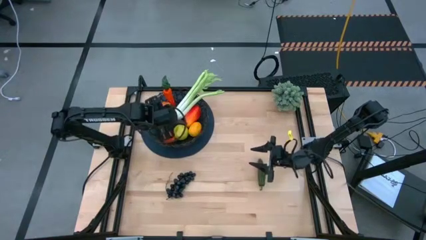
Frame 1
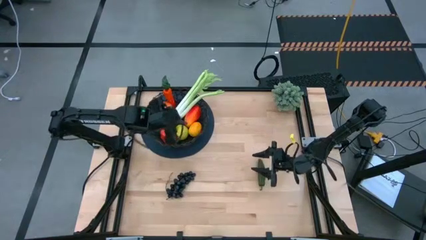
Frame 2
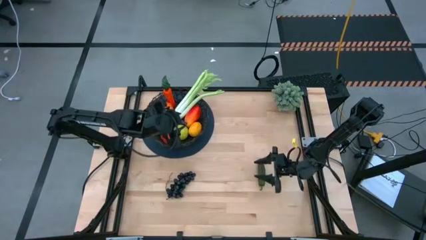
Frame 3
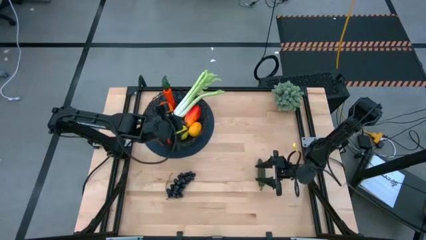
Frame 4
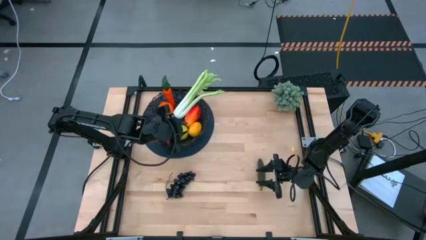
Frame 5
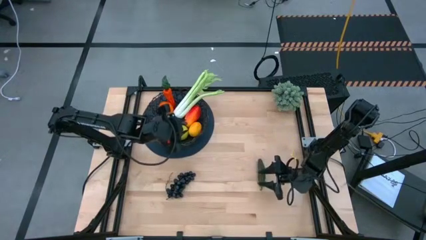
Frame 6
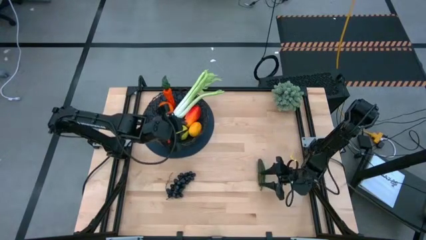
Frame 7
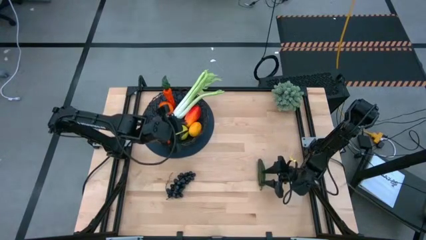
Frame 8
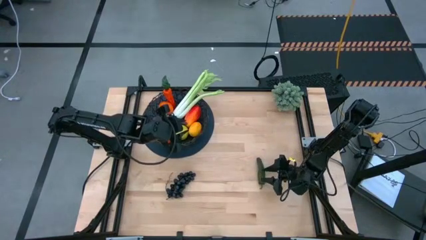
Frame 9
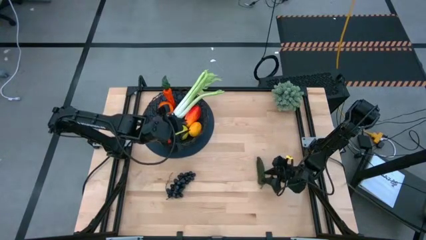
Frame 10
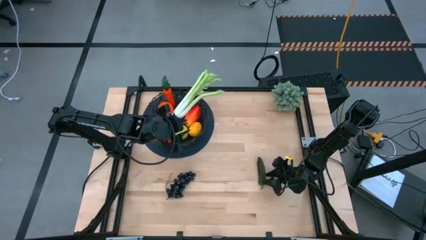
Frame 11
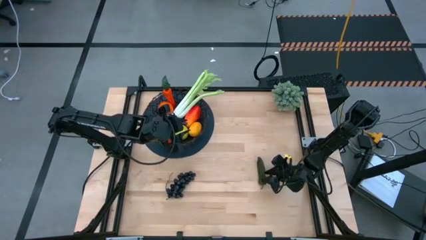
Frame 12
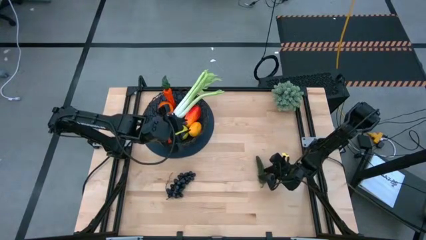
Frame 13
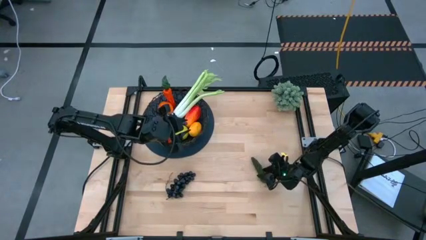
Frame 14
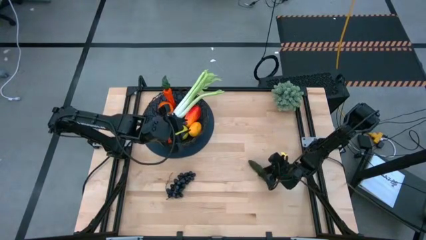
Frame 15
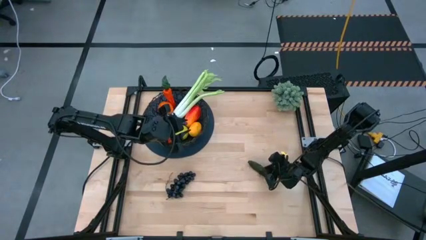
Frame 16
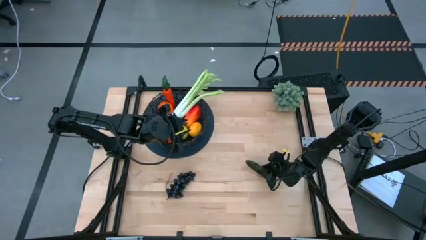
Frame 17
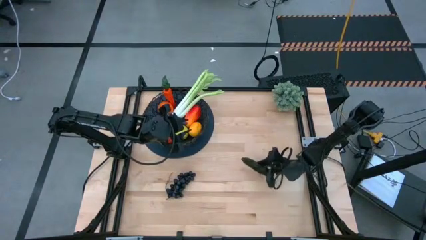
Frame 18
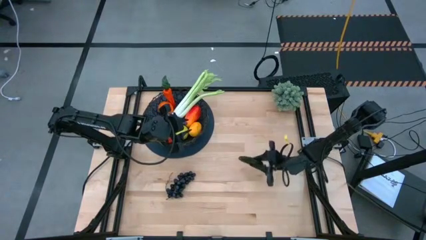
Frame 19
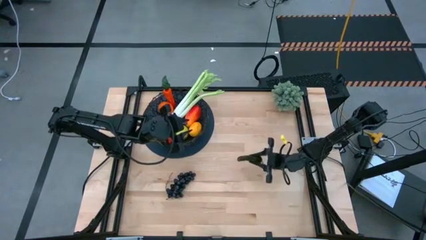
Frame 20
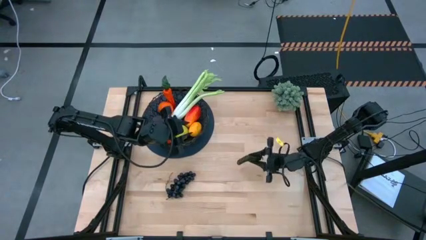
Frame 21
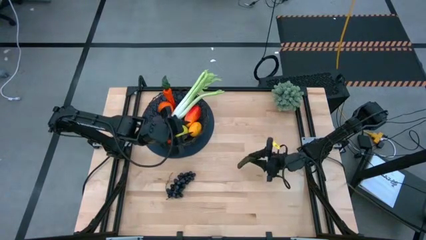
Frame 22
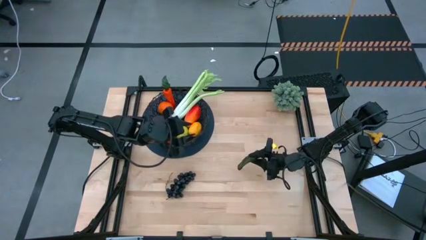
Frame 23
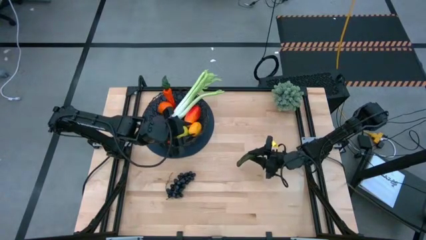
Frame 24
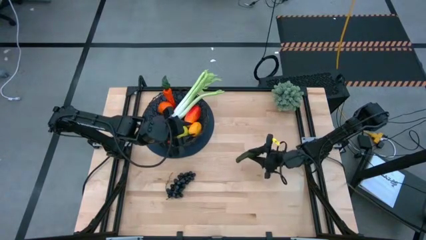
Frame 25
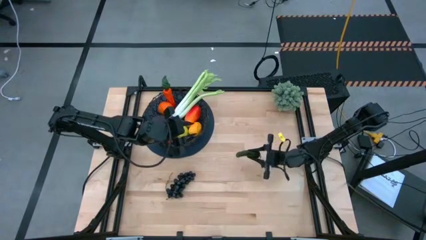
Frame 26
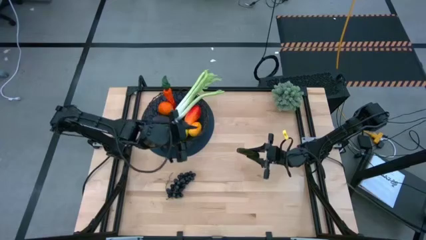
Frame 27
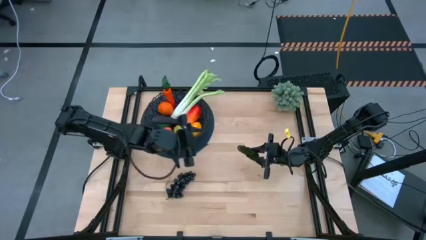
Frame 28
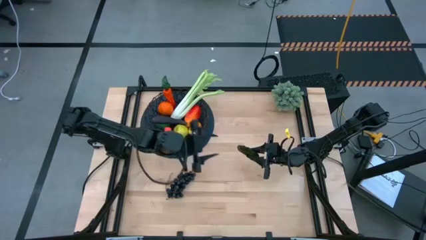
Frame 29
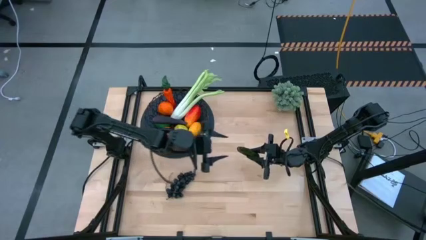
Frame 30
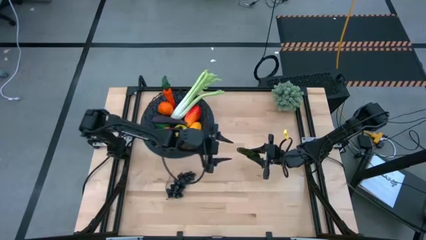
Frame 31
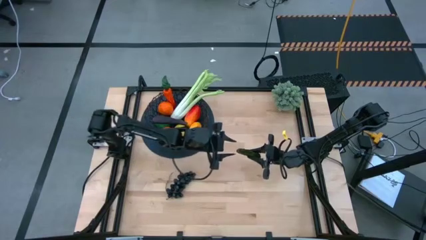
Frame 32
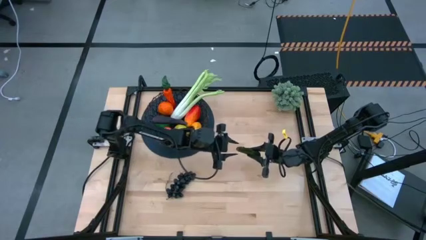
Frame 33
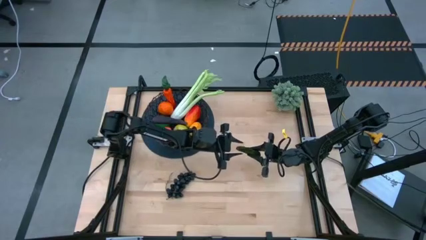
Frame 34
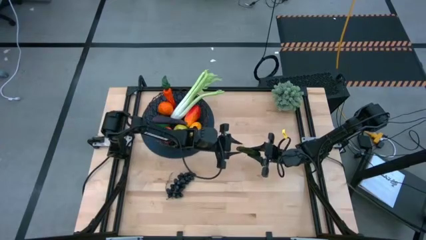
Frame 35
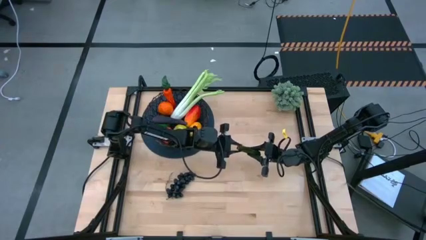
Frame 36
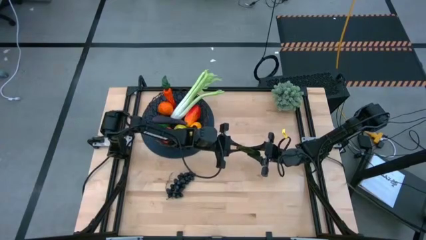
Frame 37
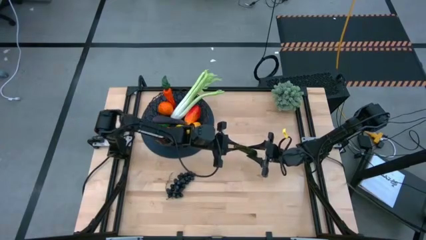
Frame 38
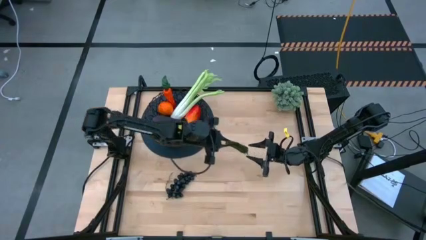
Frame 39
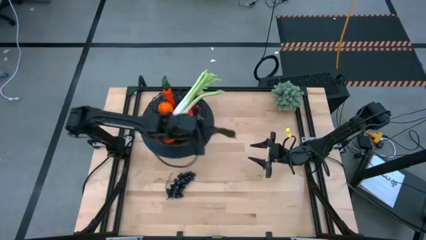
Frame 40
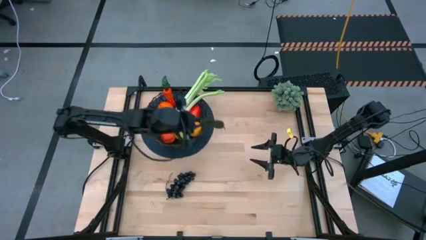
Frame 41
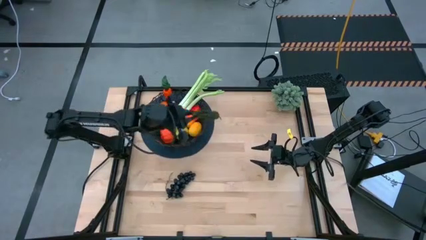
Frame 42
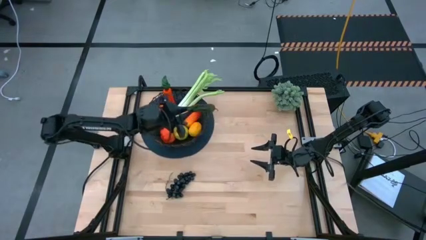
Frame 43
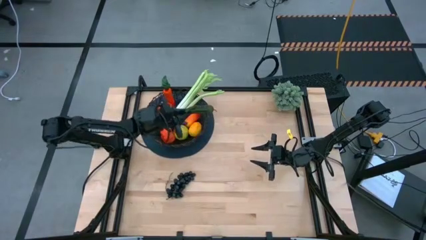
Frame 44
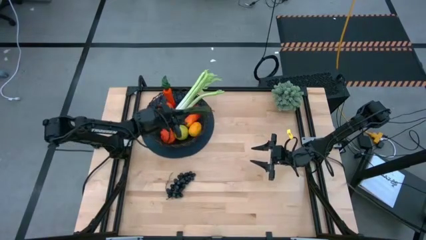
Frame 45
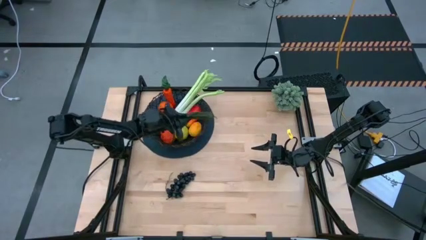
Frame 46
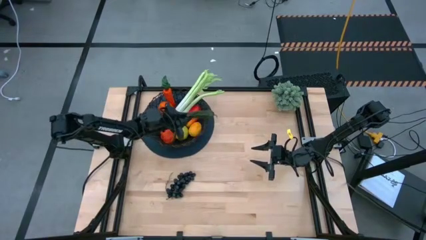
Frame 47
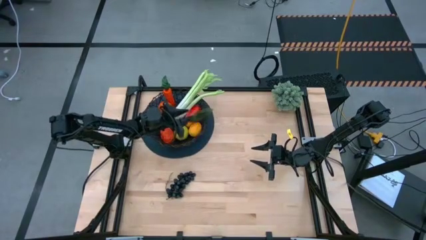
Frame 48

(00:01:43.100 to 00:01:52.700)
Task: Build produce basket
Put the green chili pepper into the black basket

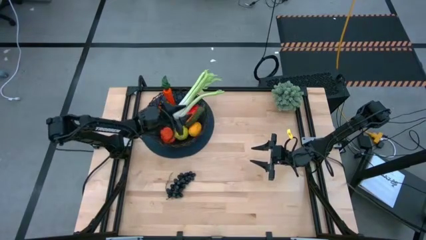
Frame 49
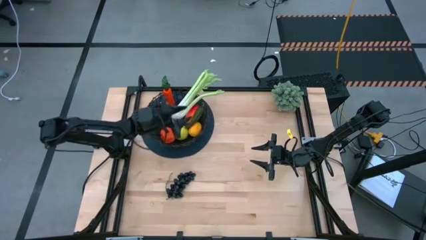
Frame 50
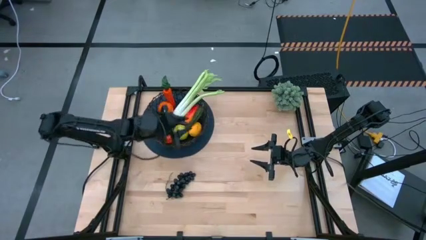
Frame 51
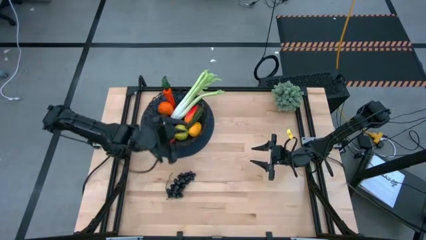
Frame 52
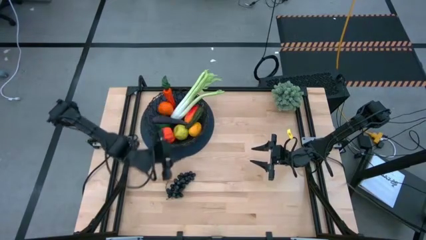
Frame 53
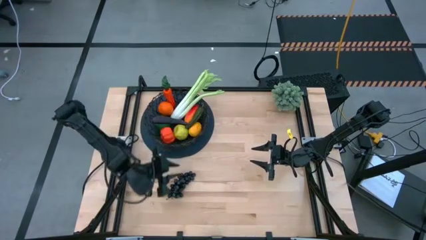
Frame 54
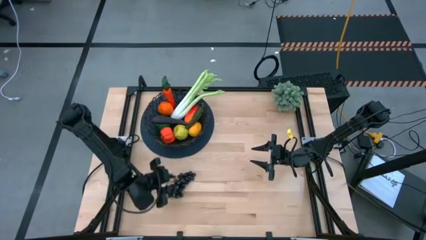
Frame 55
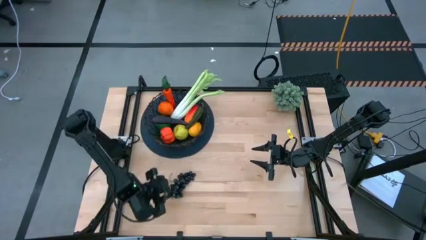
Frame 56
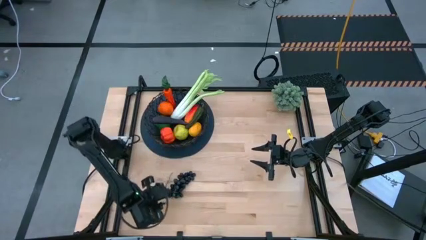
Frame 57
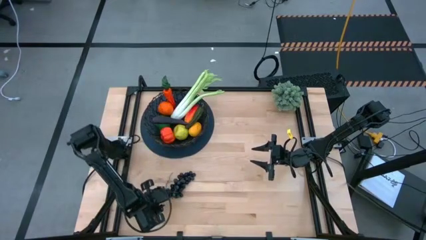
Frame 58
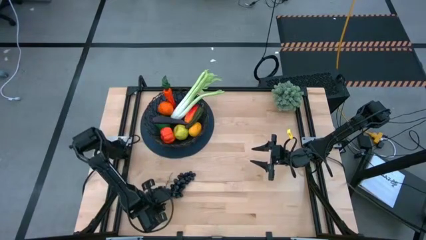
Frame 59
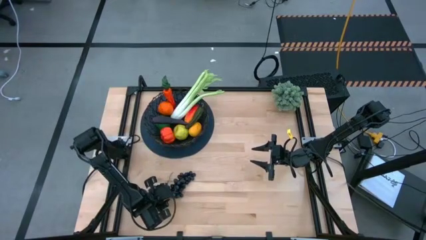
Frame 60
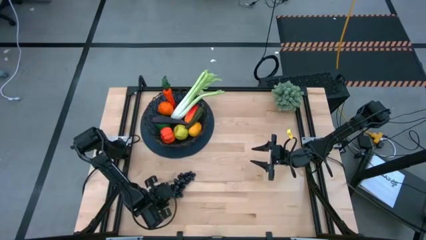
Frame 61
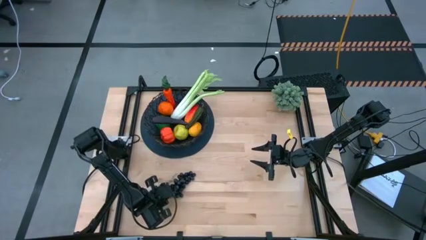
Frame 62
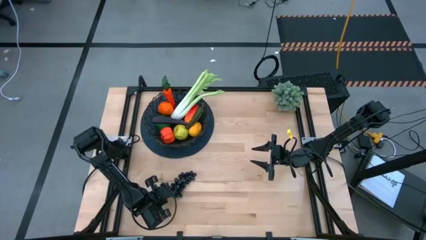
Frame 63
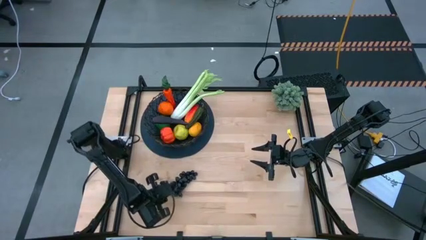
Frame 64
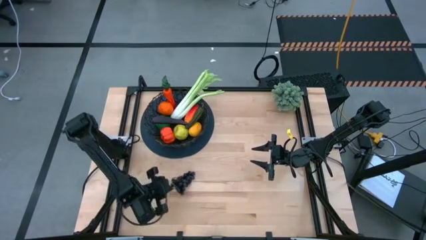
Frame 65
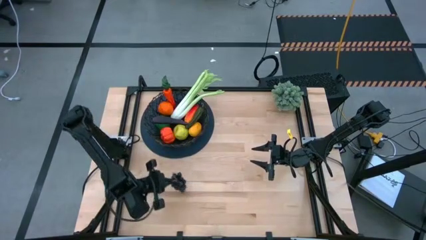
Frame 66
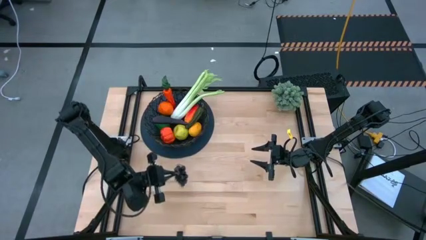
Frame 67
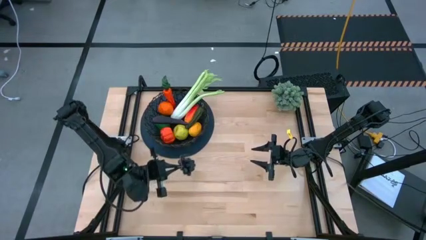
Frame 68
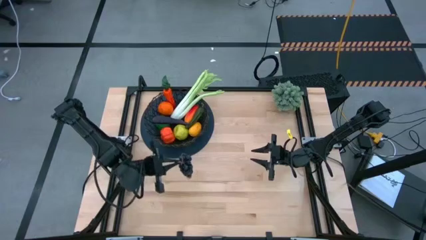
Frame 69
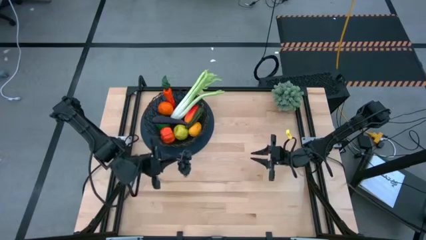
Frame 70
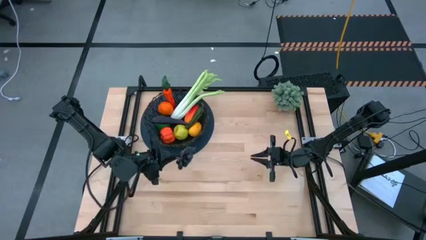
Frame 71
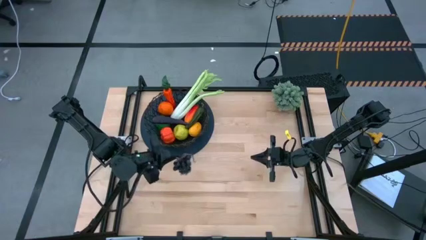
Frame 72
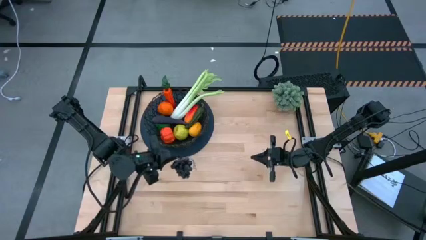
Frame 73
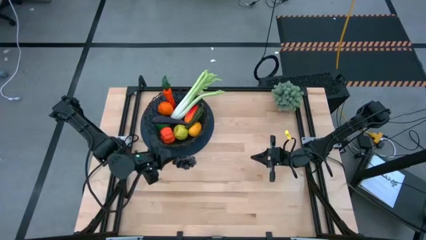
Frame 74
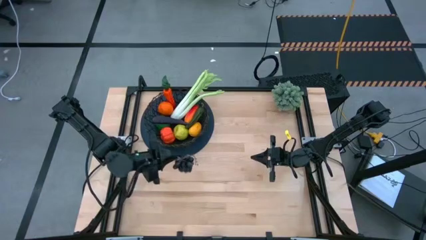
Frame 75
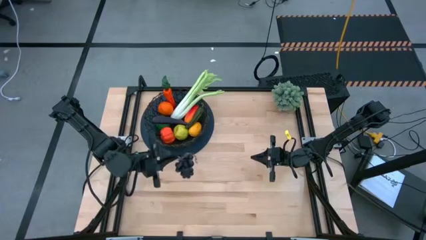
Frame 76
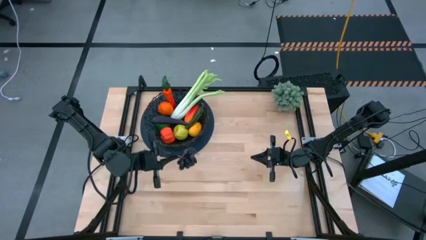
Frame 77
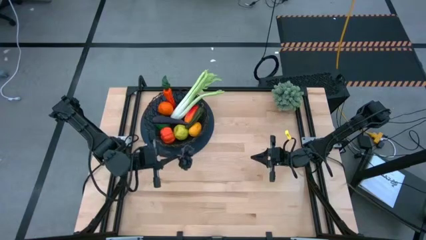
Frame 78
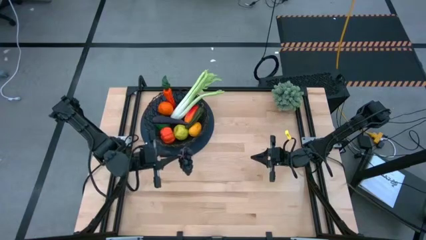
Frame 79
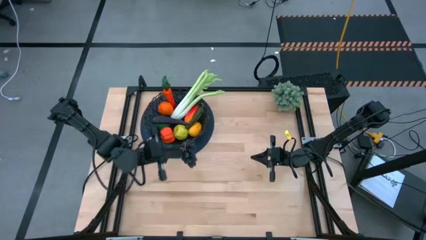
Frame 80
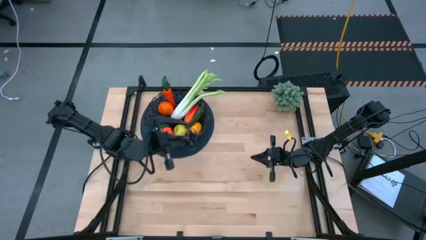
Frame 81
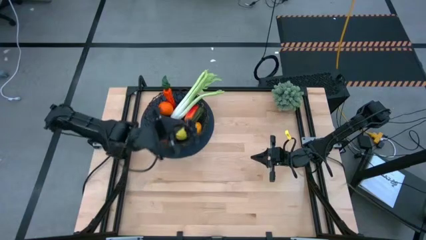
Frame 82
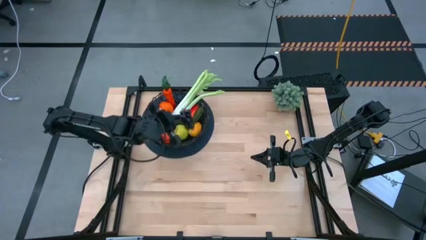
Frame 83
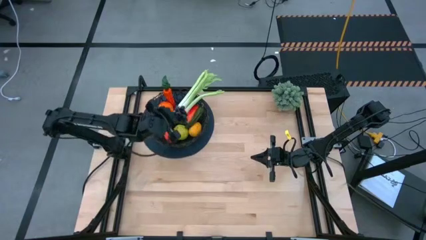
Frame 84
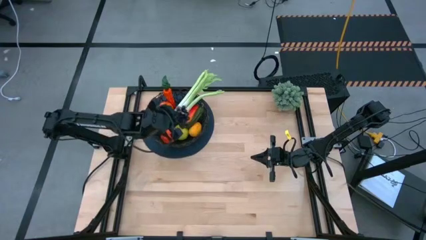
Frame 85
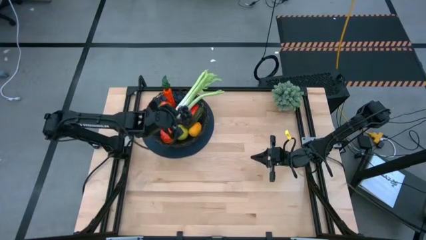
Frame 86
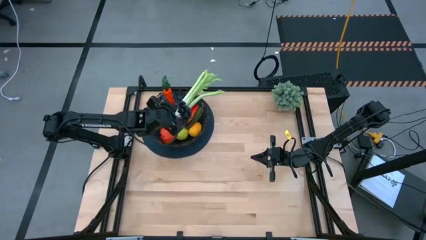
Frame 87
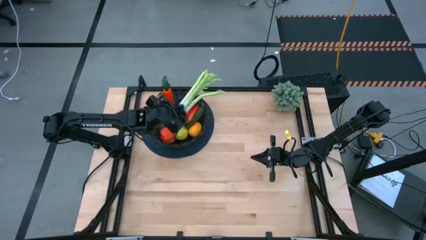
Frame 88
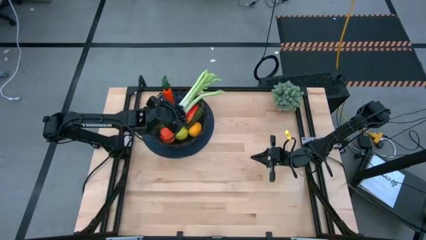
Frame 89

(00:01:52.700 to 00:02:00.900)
Put the violet grapes into the black basket
